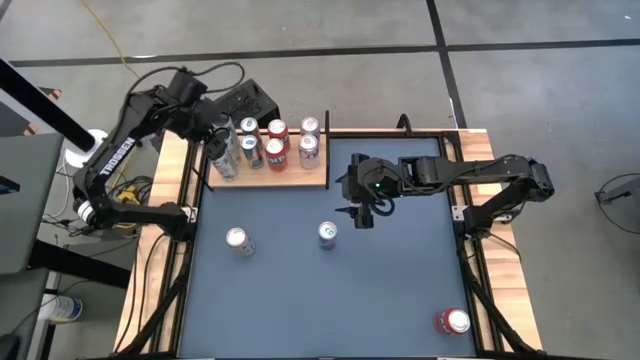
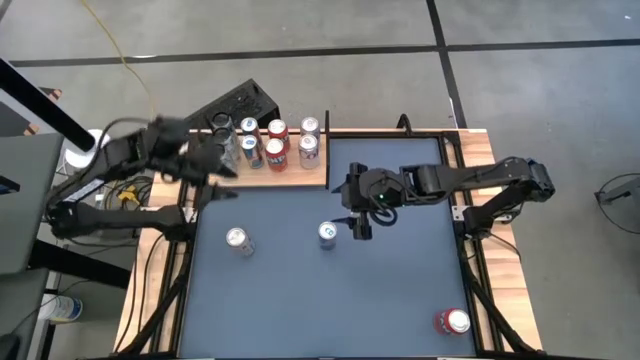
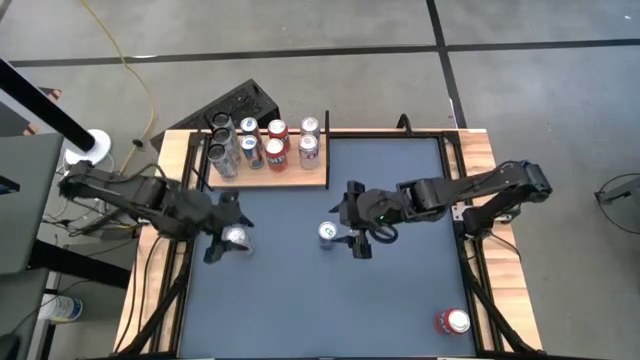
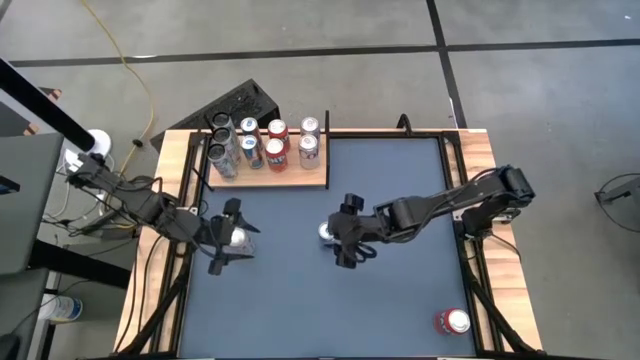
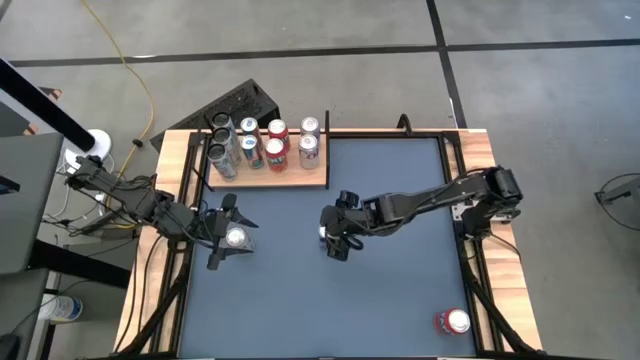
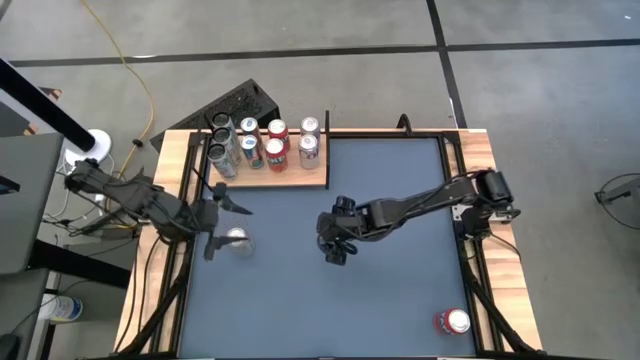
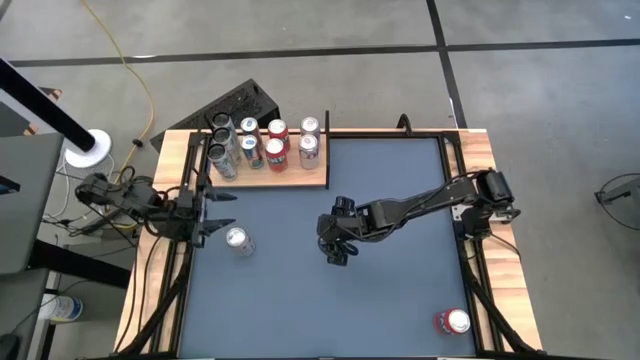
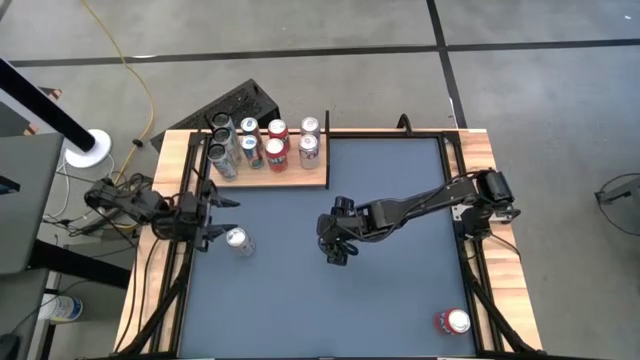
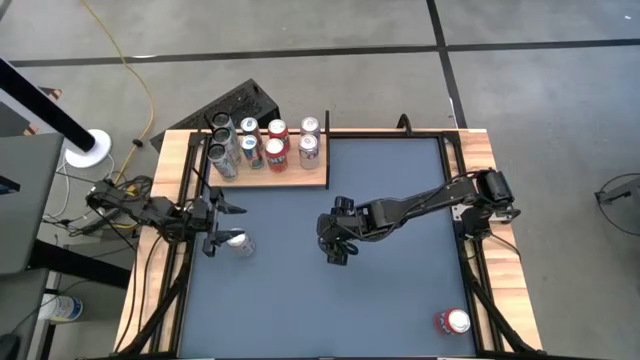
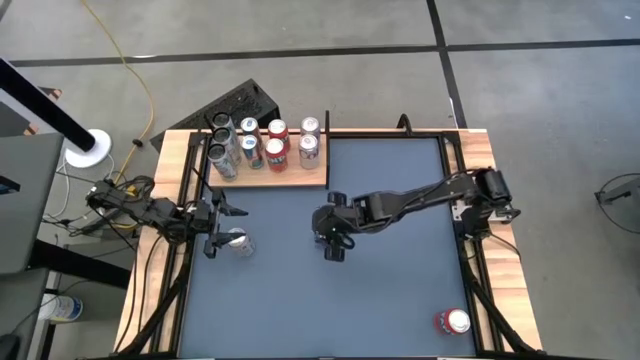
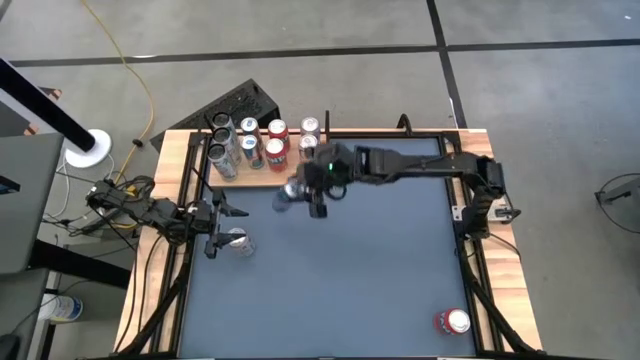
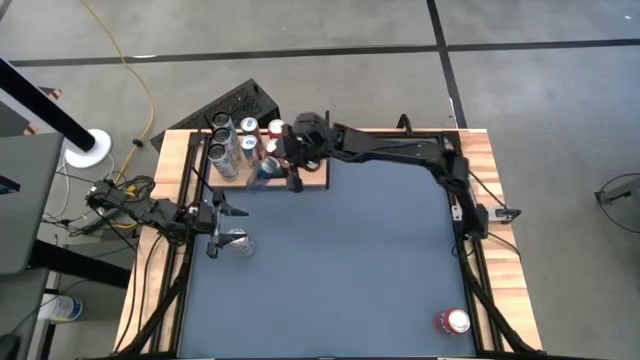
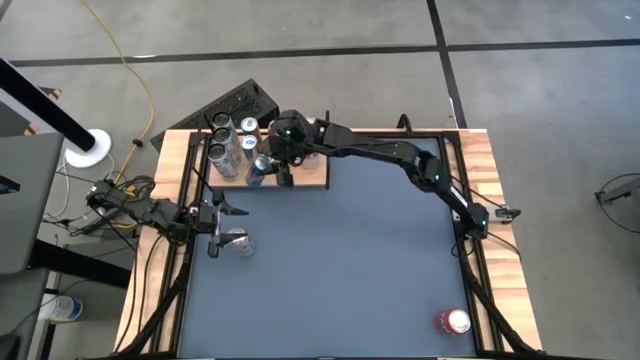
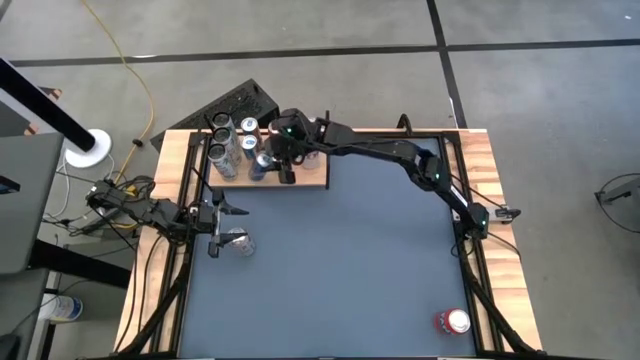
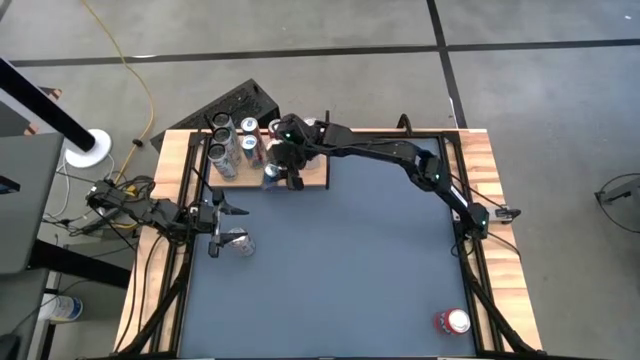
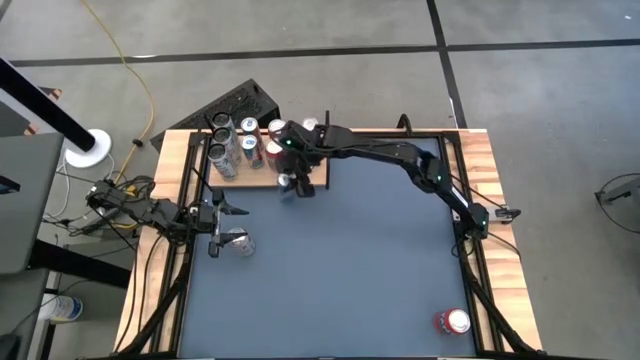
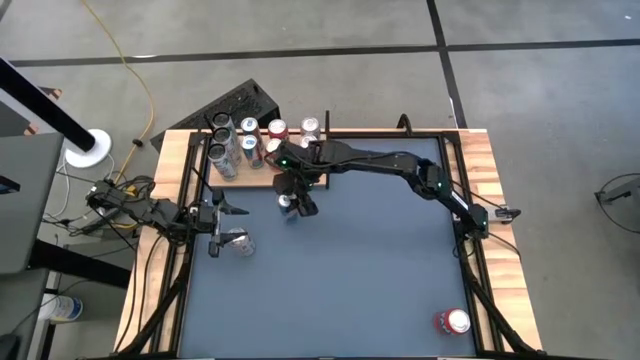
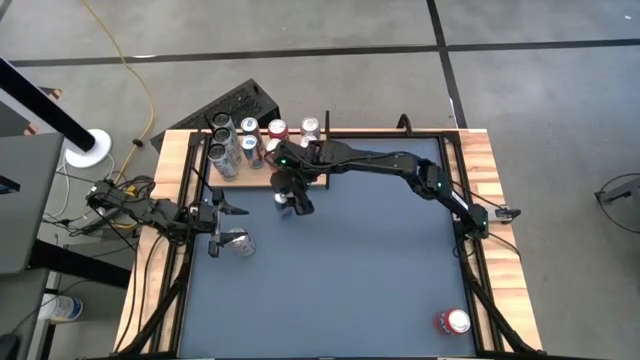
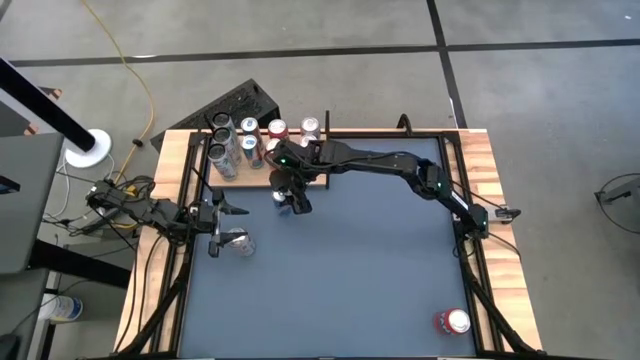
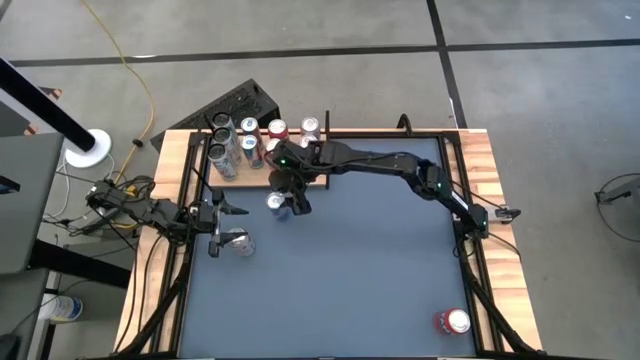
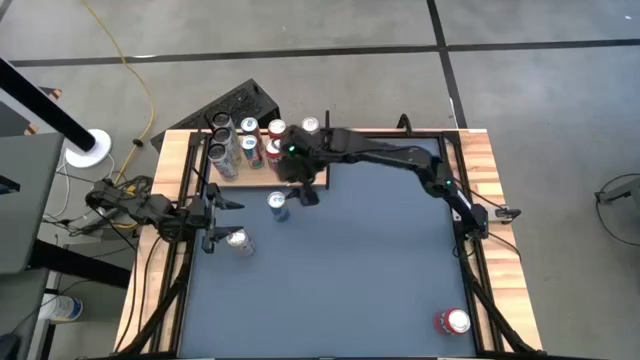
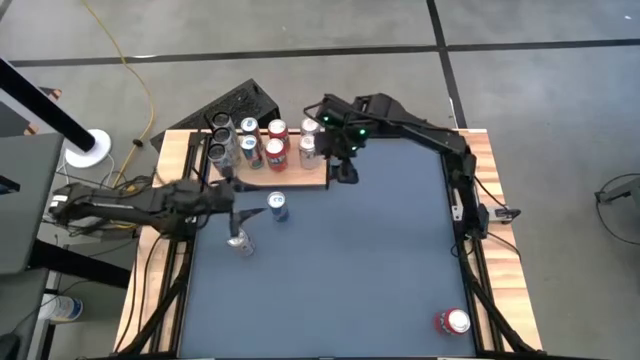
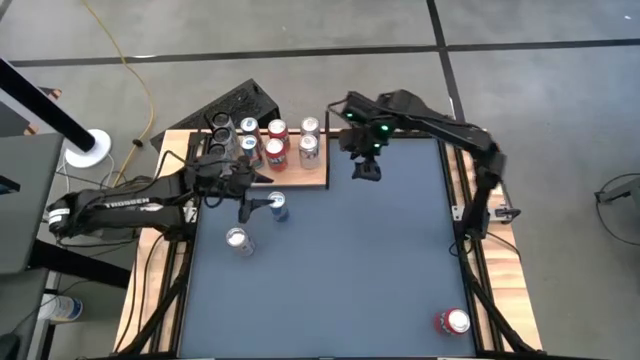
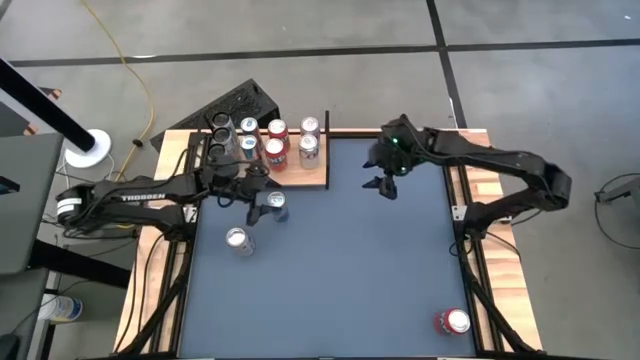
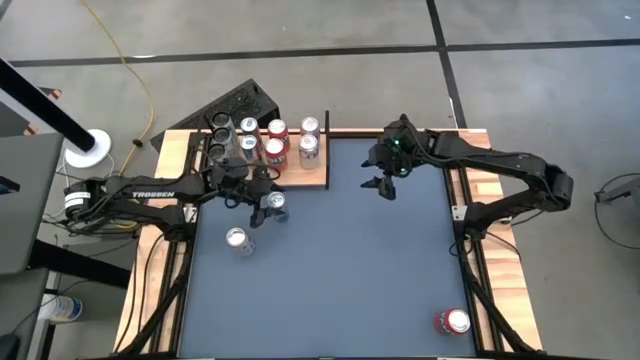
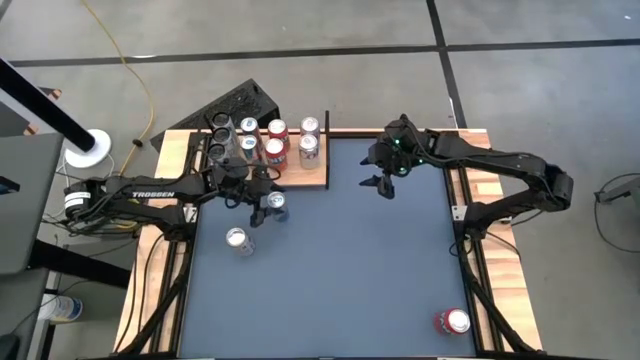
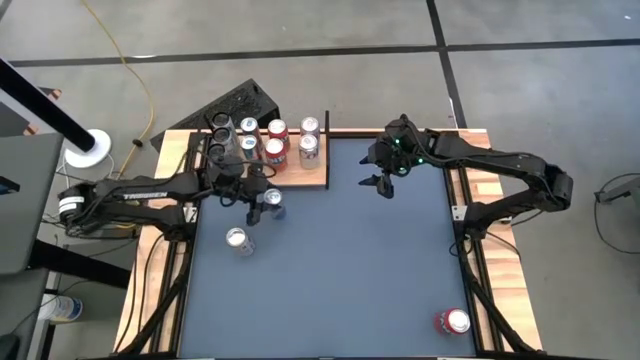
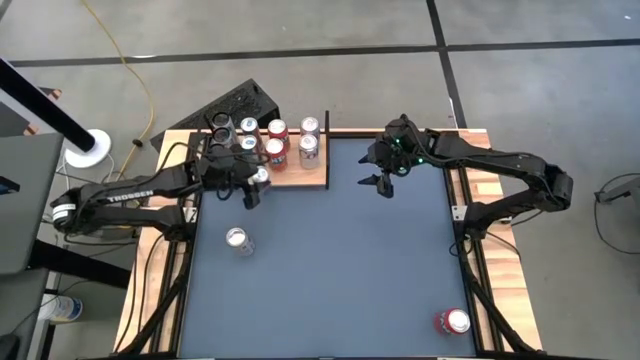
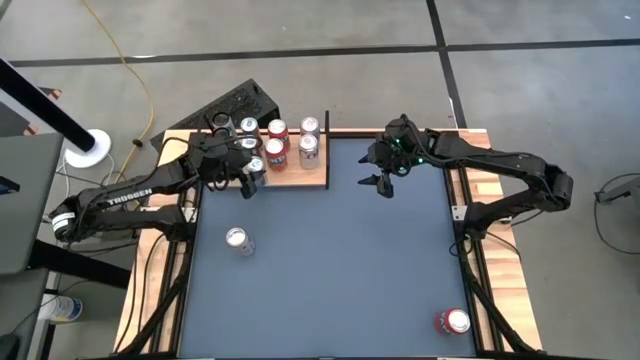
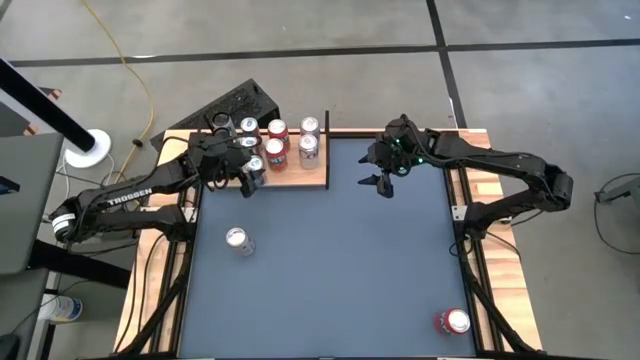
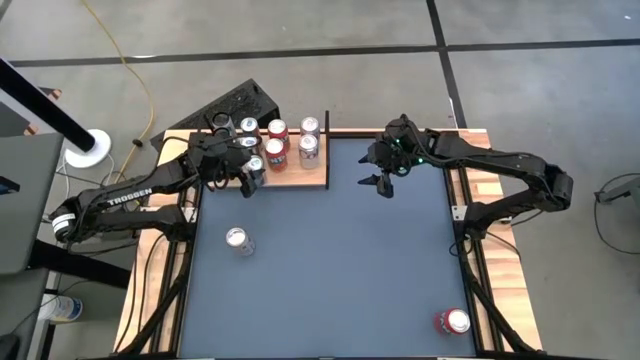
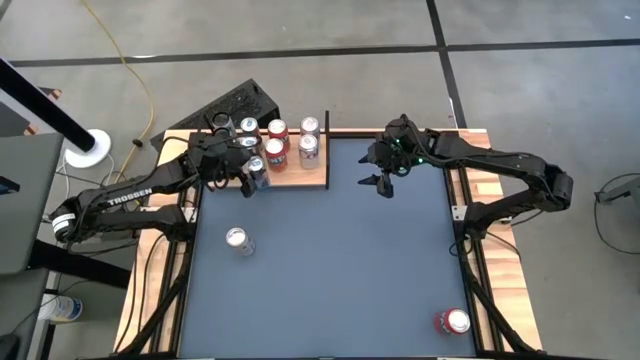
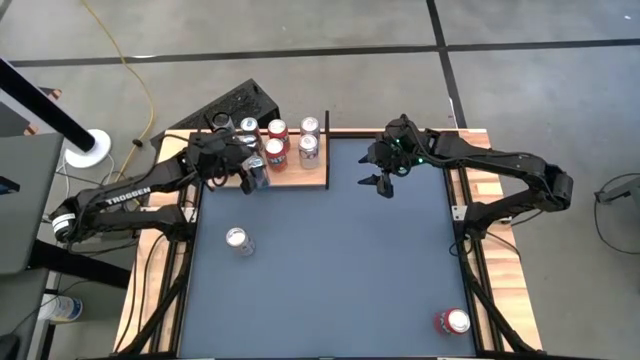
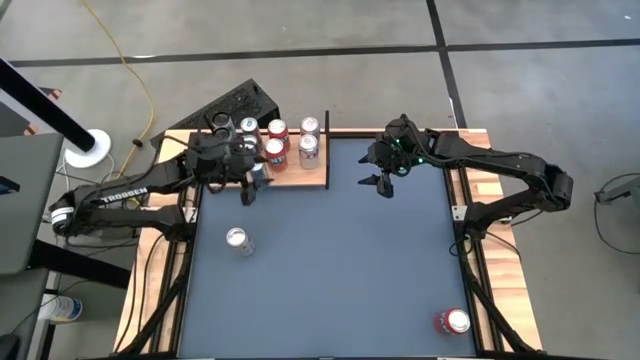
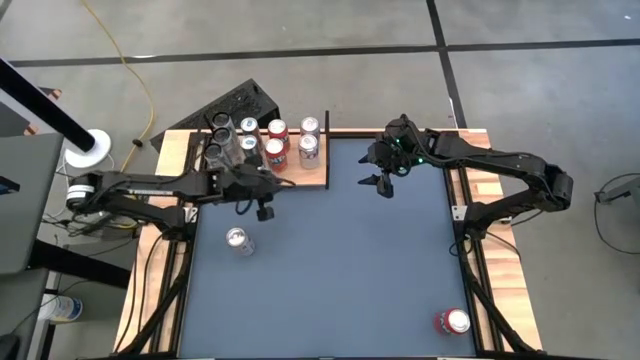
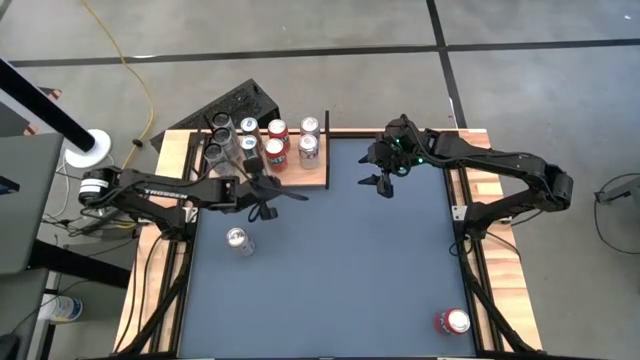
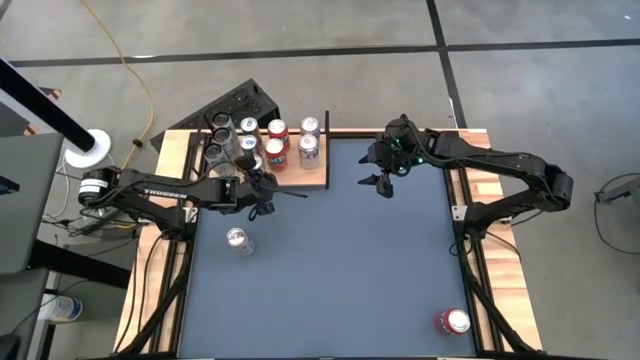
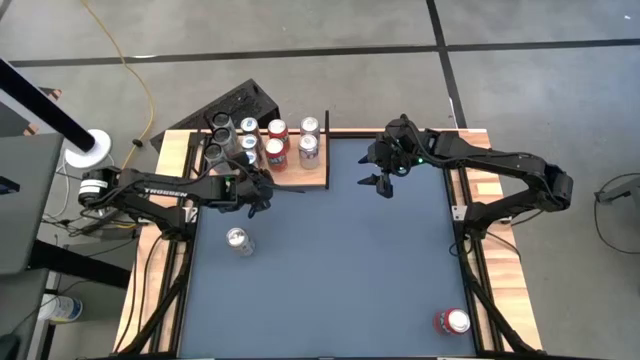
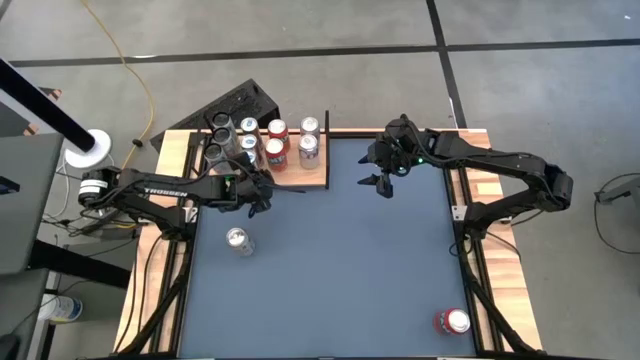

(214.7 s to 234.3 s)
Task: Place canned beverage on shelf
Put the blue soda can on the shelf aligned with the other blue soda can

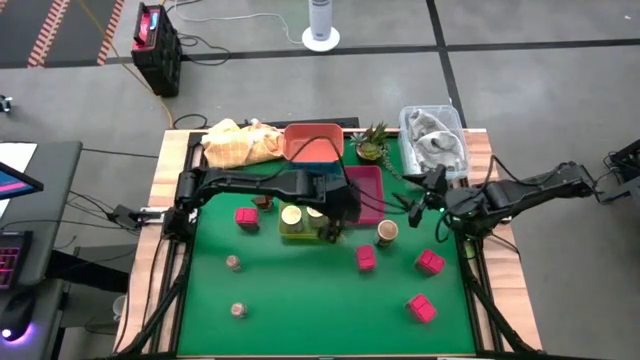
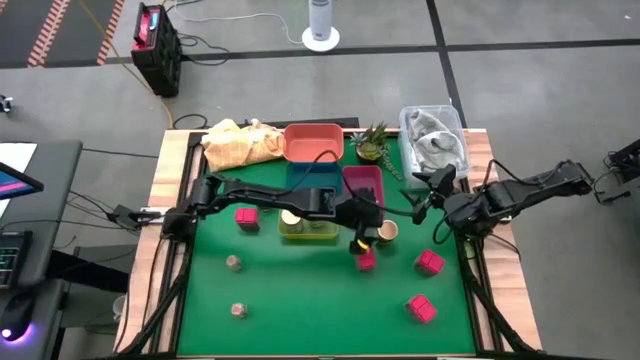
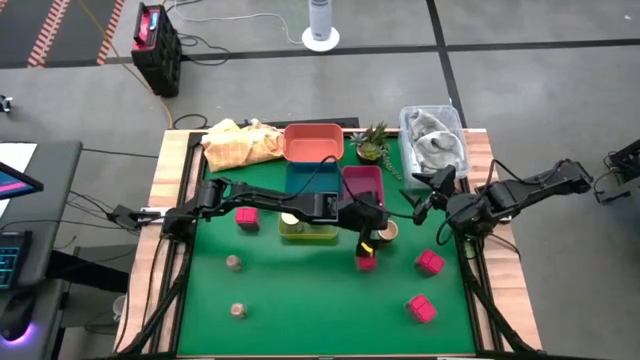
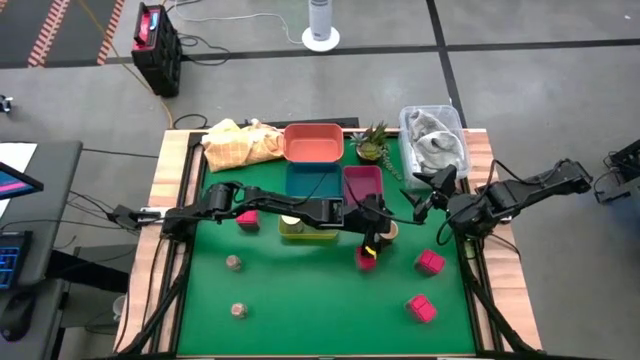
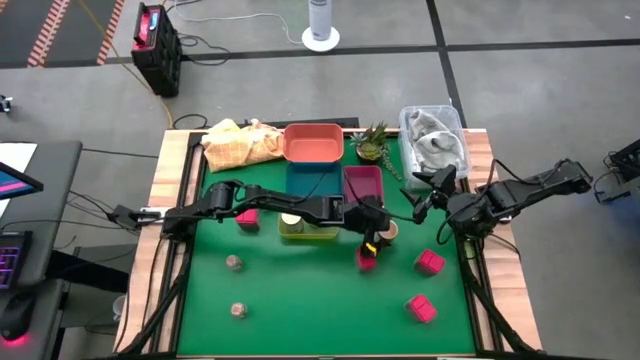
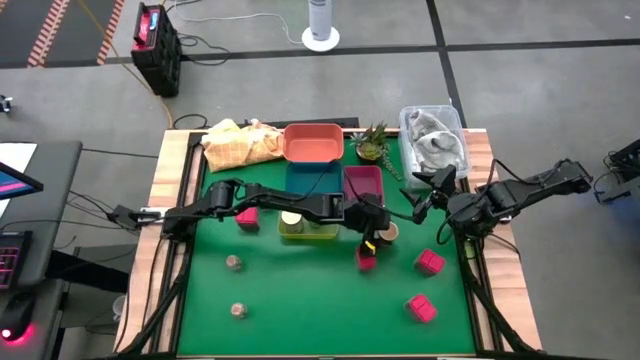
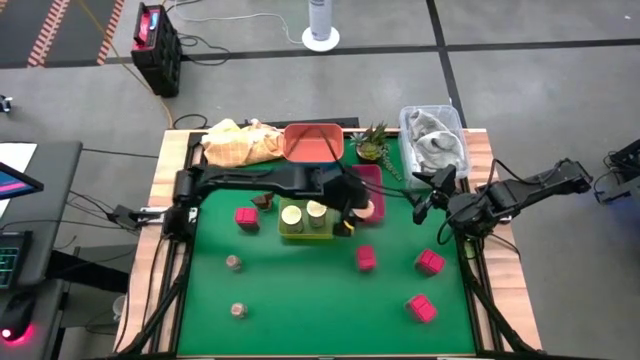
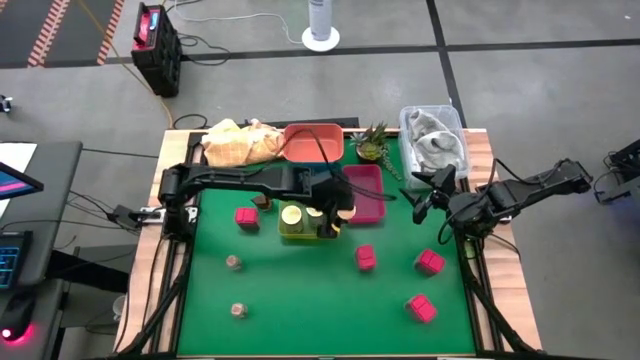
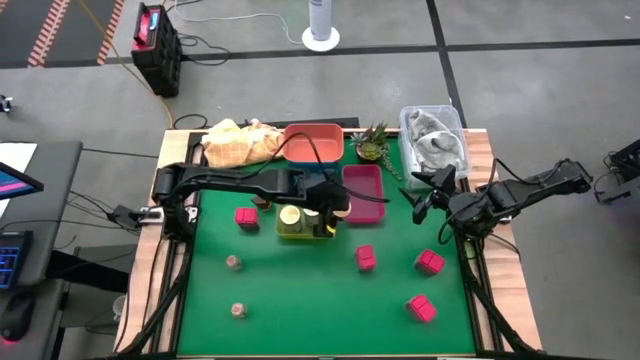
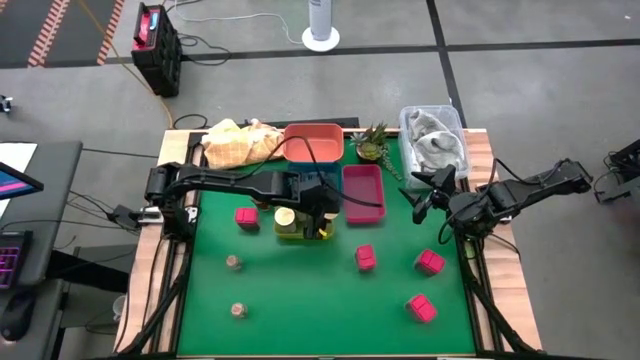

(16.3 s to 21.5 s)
Task: Sort spices by type
Put the brown seasoning bottle into the yellow bin
